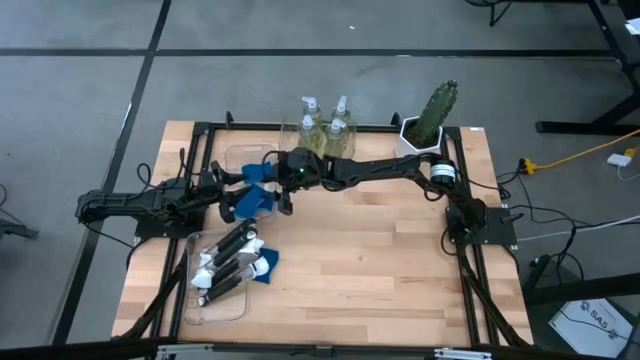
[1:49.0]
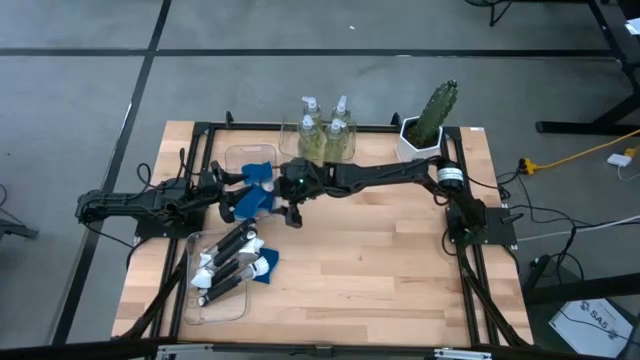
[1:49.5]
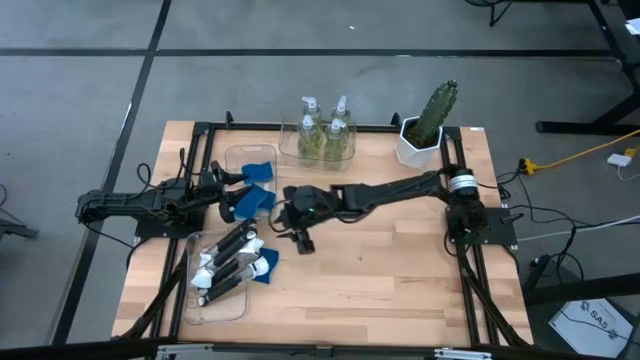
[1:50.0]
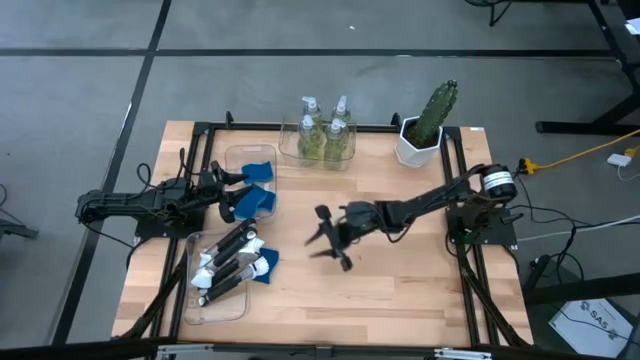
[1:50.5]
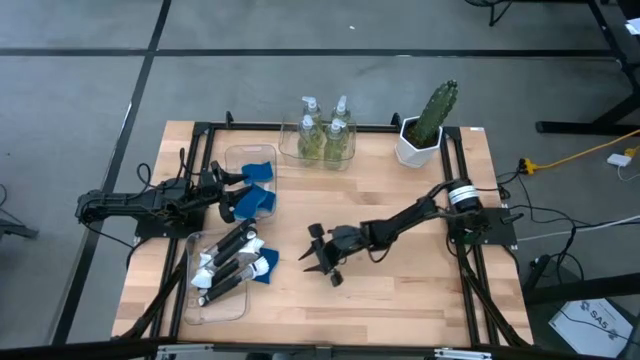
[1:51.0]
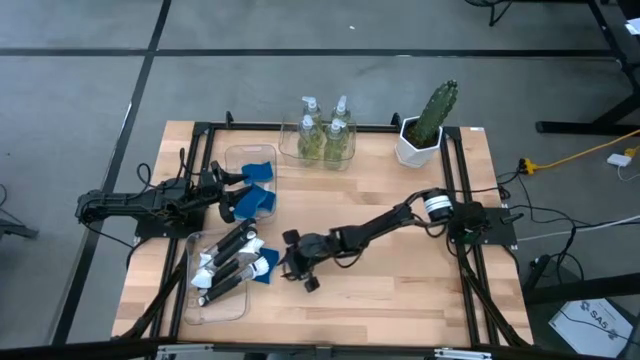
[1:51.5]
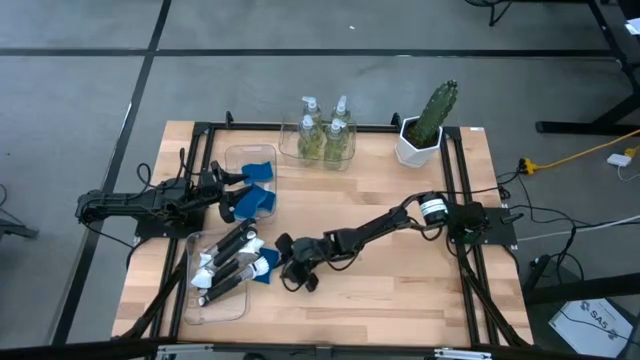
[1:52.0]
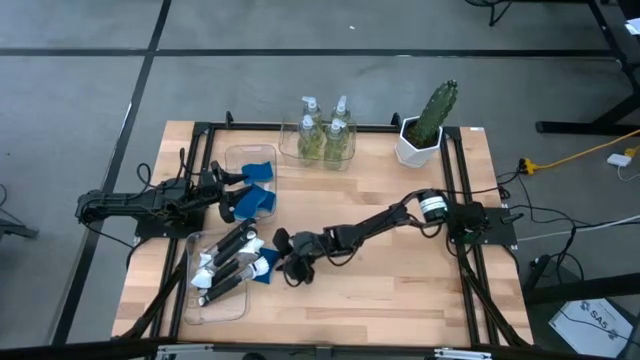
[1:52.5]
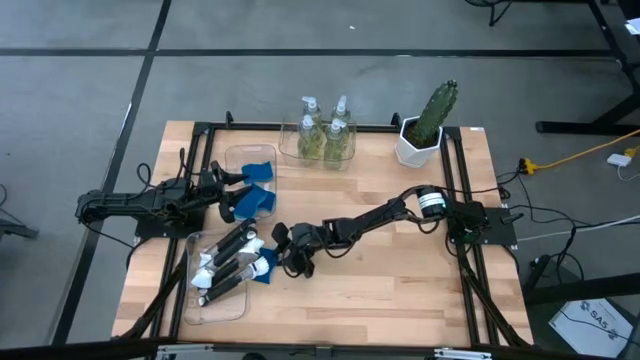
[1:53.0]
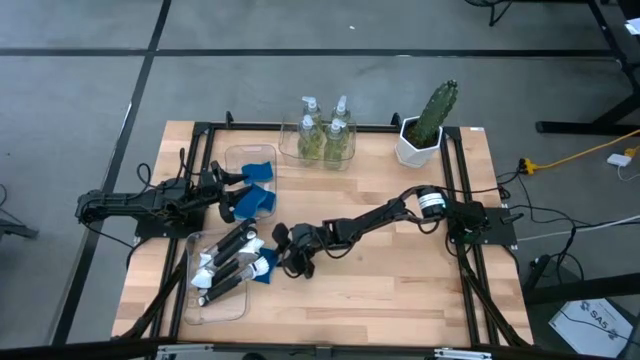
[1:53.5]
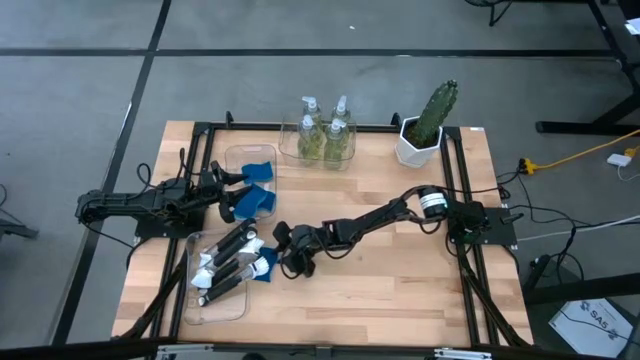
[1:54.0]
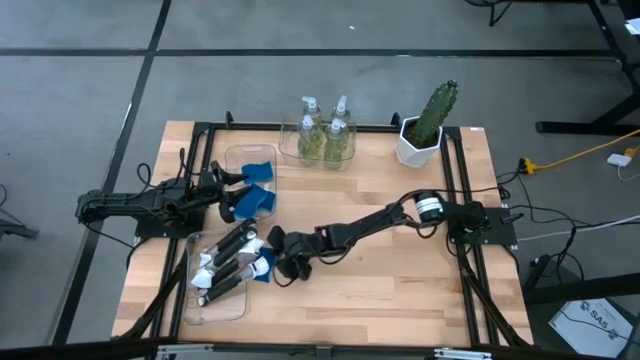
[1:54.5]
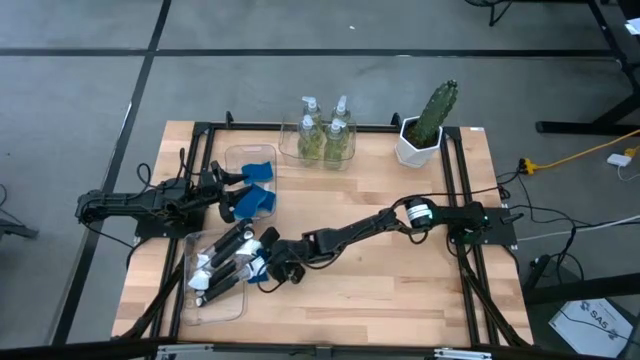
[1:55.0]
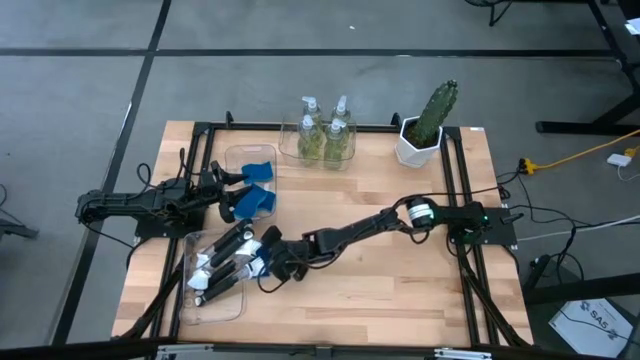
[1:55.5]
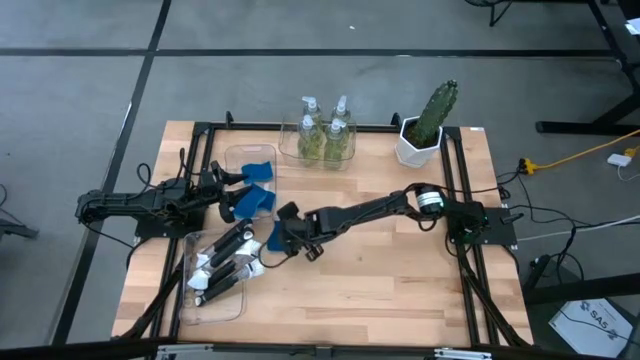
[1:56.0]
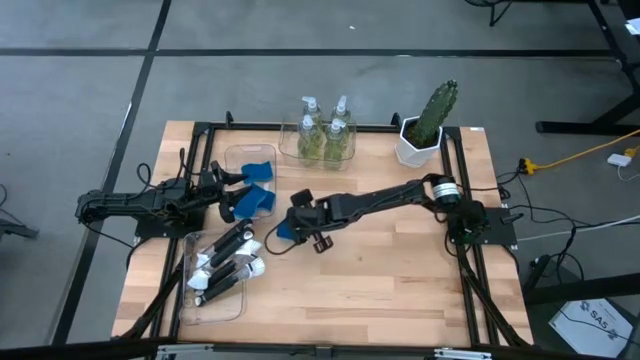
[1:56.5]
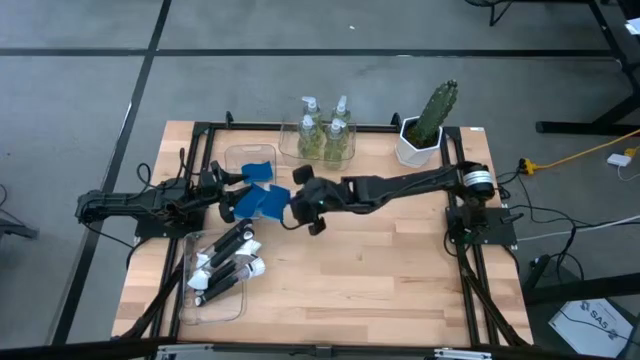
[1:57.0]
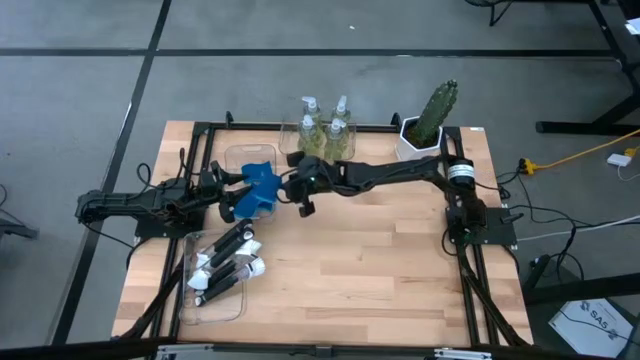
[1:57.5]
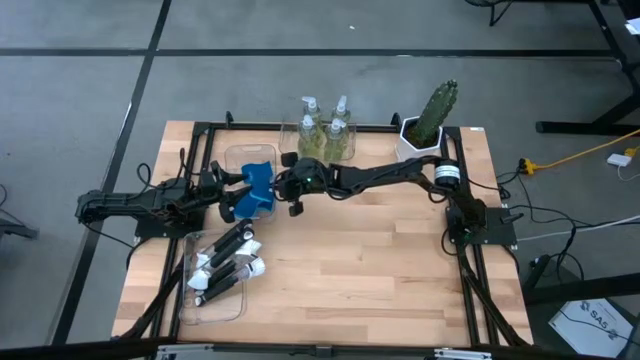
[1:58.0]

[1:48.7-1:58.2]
Task: Pick & Place Kitchen Sink Supplies
Put the blue sponge into the top left transparent bin

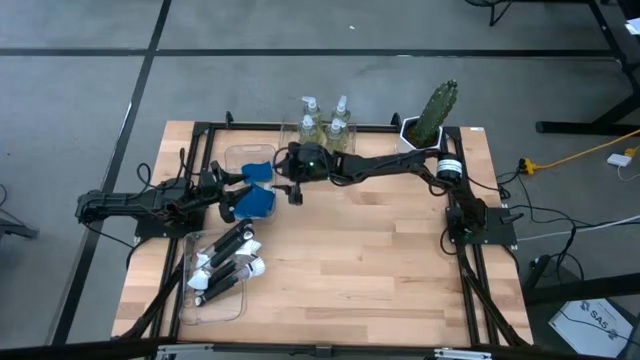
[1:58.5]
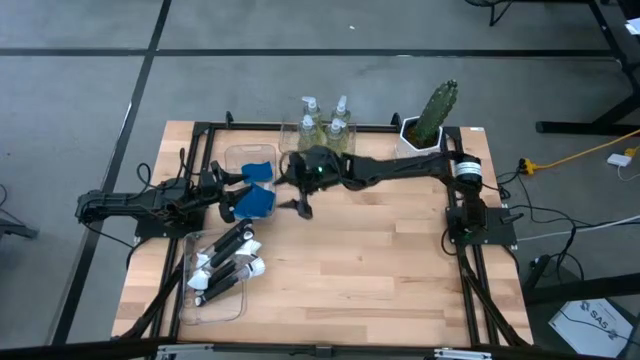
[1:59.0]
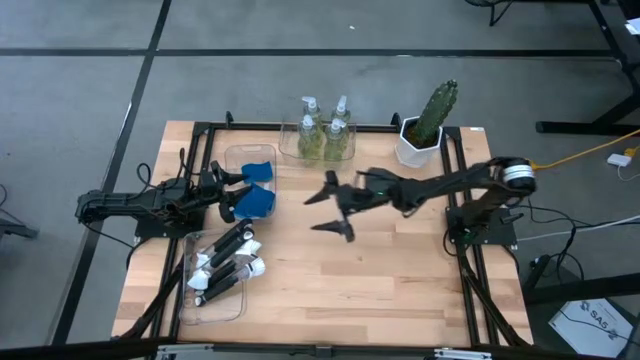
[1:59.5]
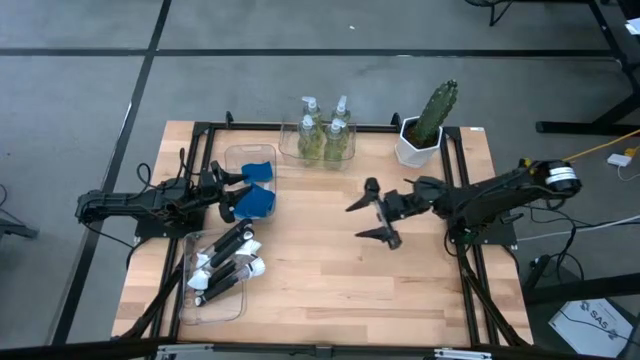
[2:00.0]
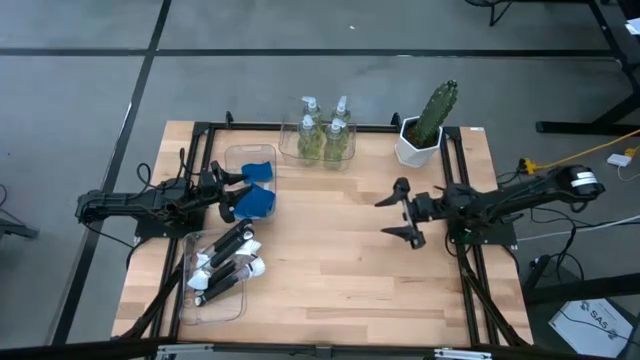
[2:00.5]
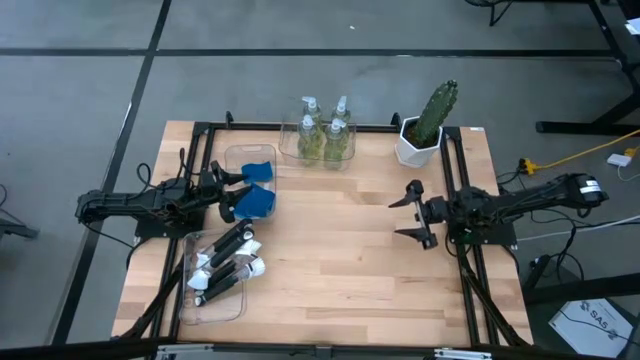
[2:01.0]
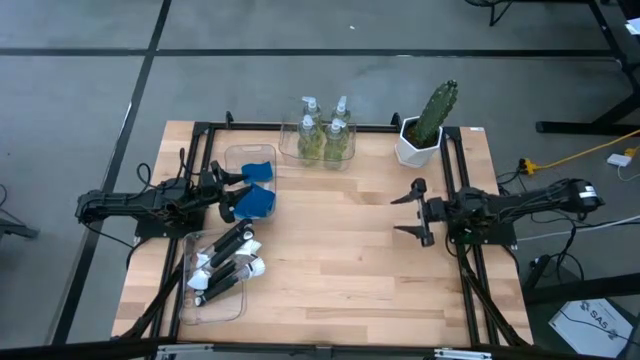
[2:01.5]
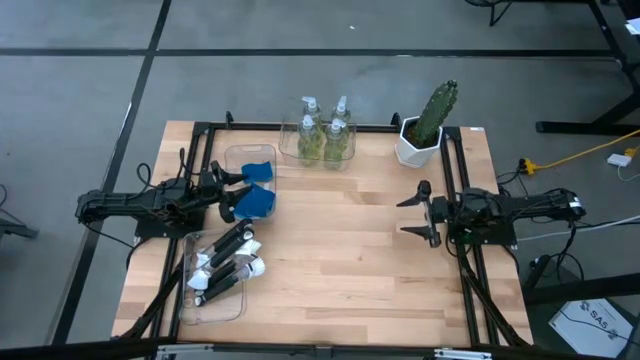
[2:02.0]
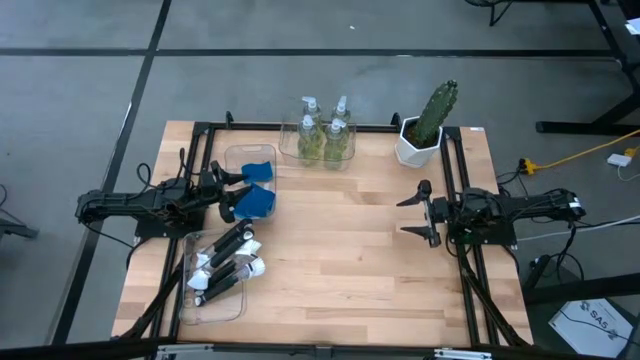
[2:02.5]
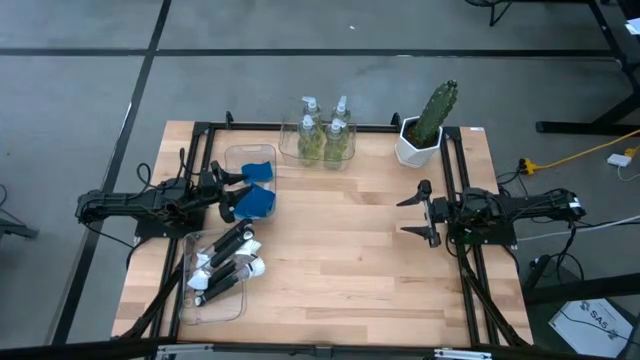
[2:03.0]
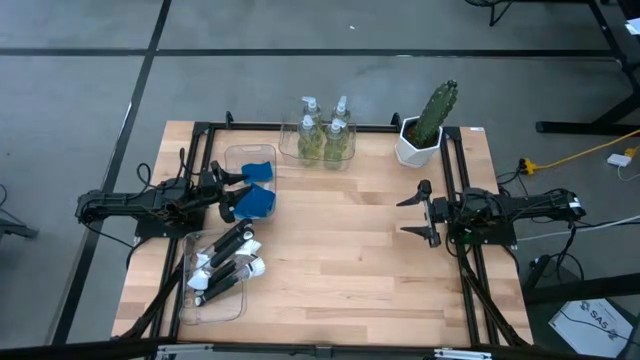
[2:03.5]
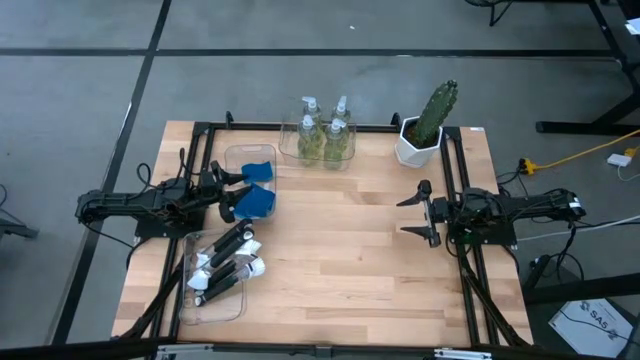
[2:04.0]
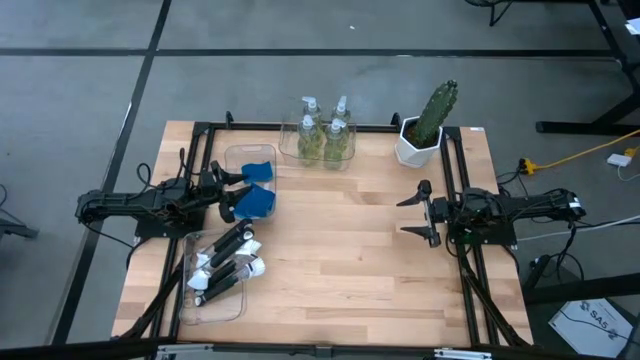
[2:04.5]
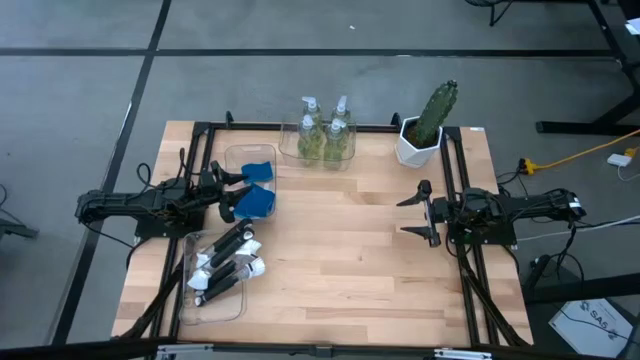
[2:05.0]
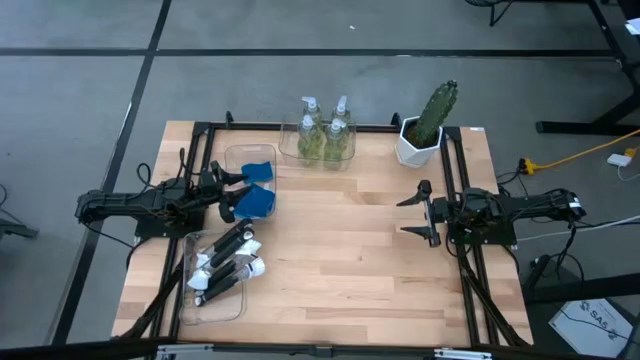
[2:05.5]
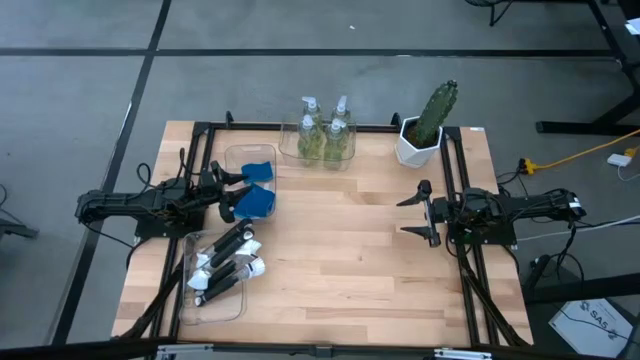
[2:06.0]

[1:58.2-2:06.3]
Return to Home Position

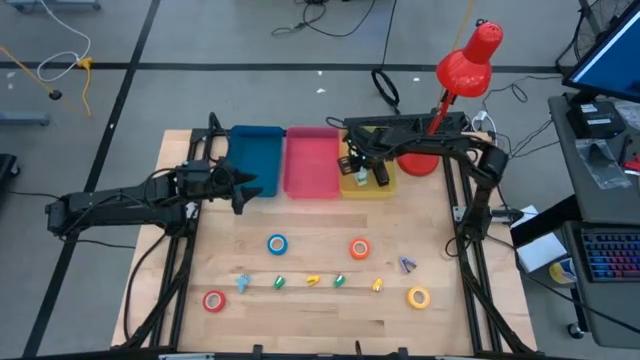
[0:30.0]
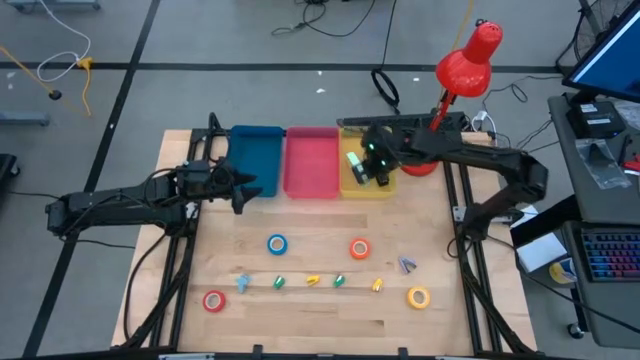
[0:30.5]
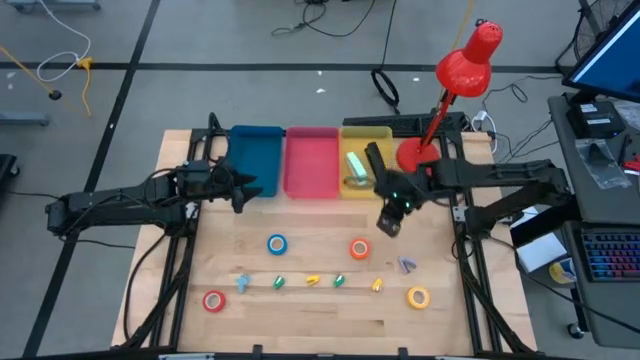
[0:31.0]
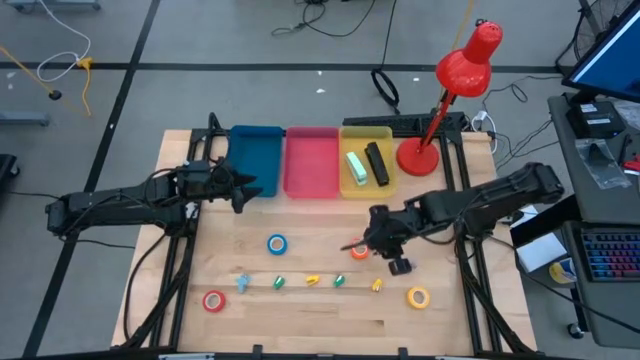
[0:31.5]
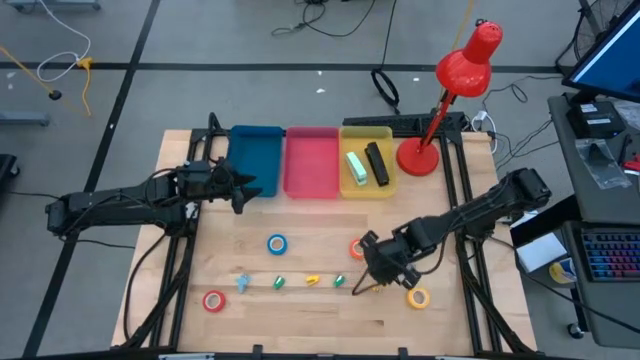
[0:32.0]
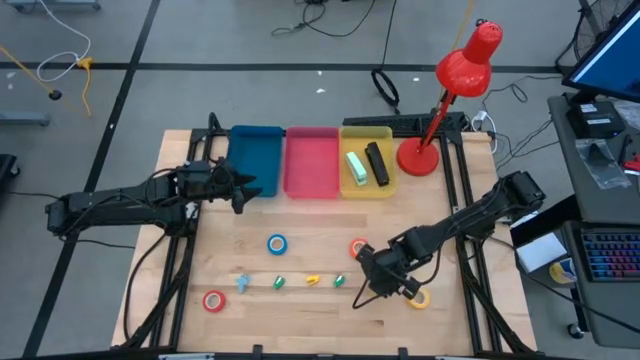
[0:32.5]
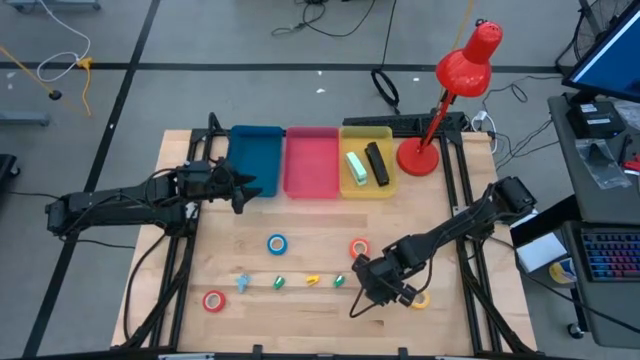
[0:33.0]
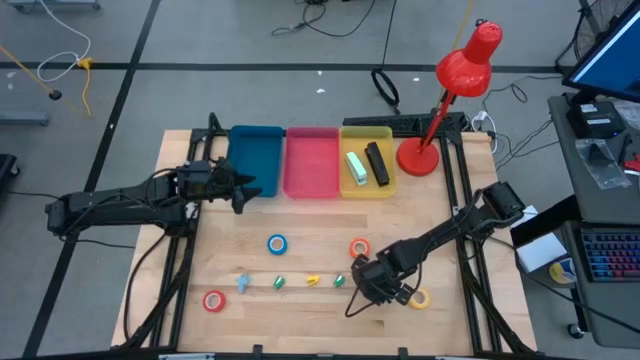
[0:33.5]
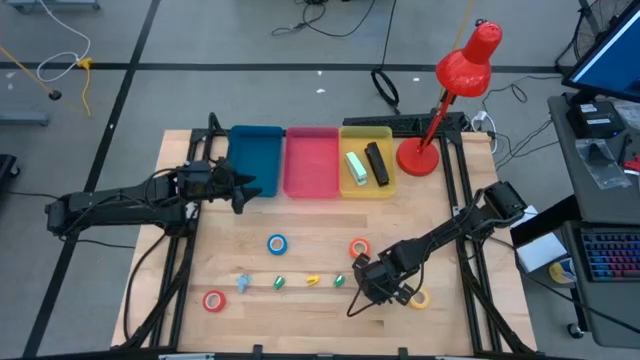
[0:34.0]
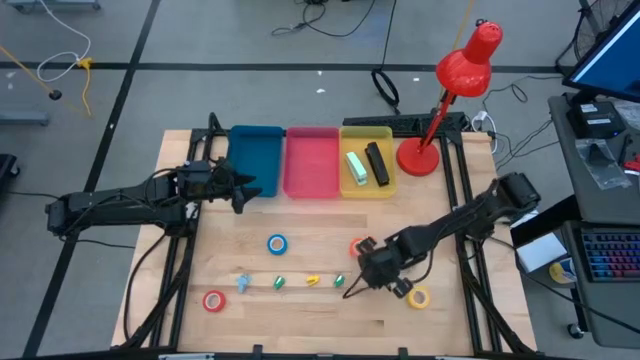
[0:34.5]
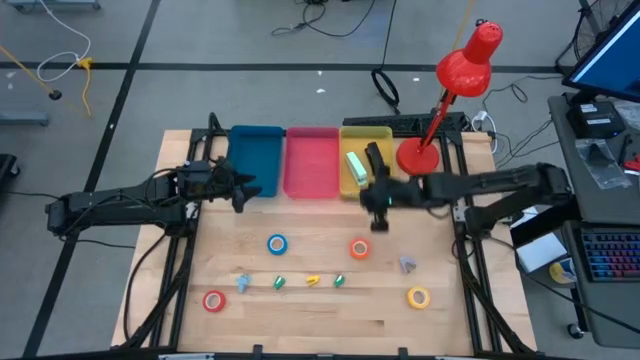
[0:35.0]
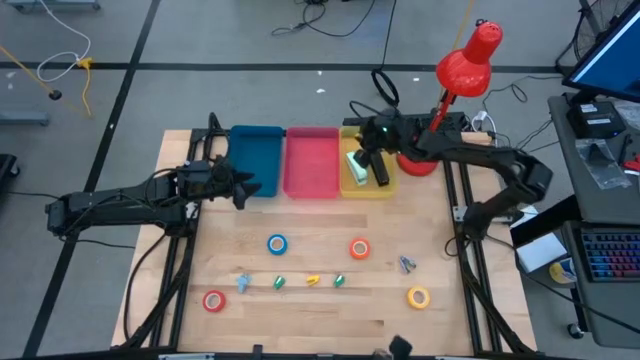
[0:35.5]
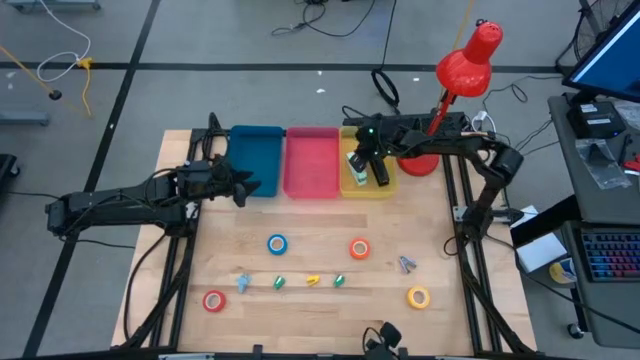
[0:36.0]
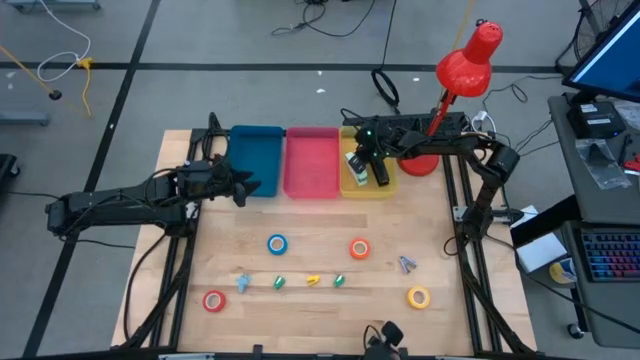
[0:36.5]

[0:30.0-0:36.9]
Task: Pick and place Stapler, Stapler remover, tape
Put the yellow stapler into the yellow bin
